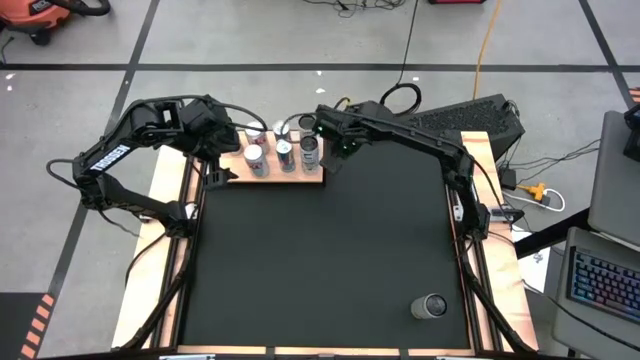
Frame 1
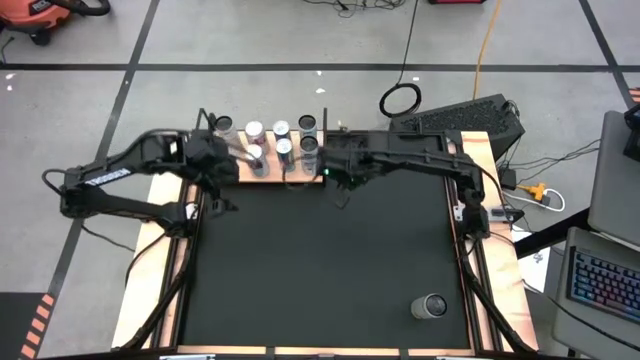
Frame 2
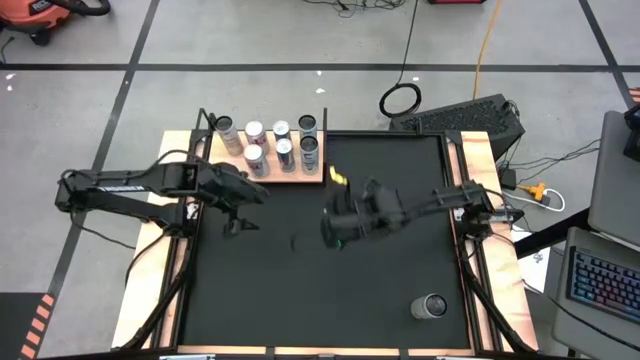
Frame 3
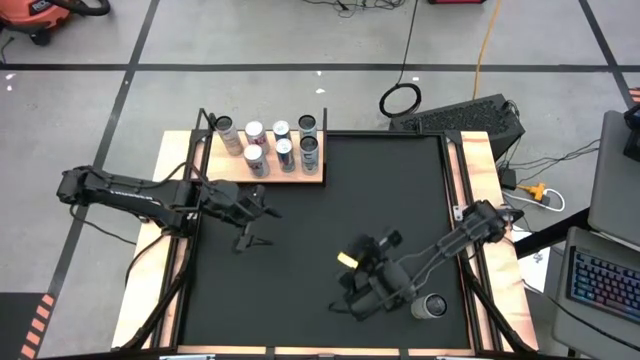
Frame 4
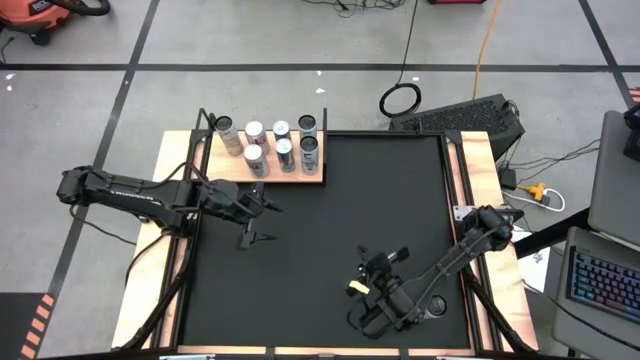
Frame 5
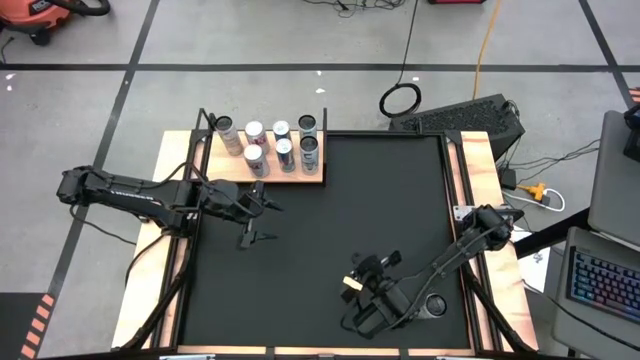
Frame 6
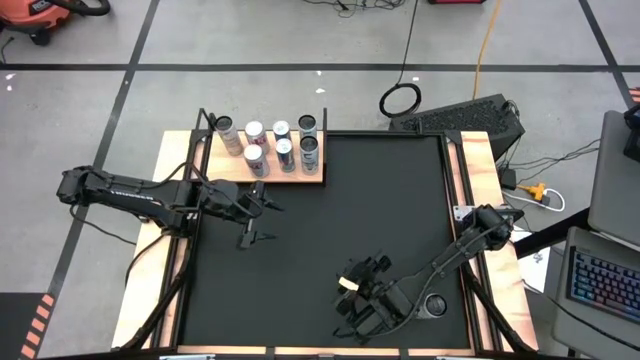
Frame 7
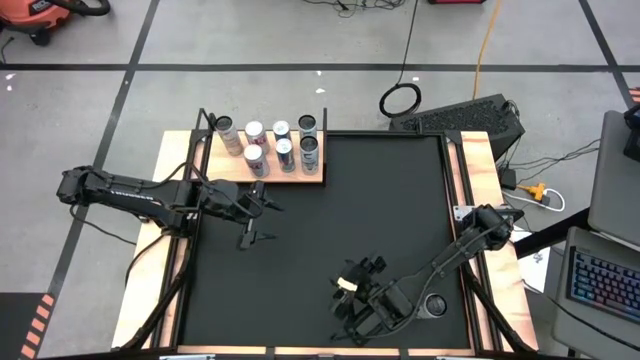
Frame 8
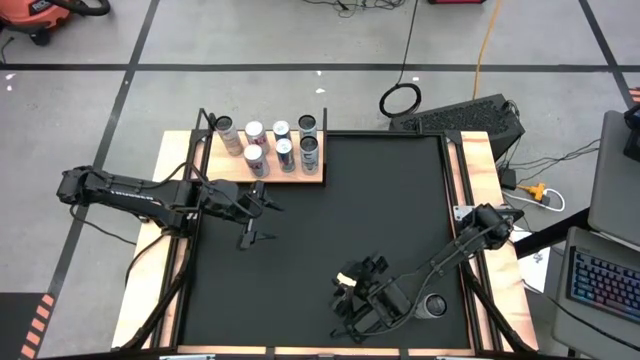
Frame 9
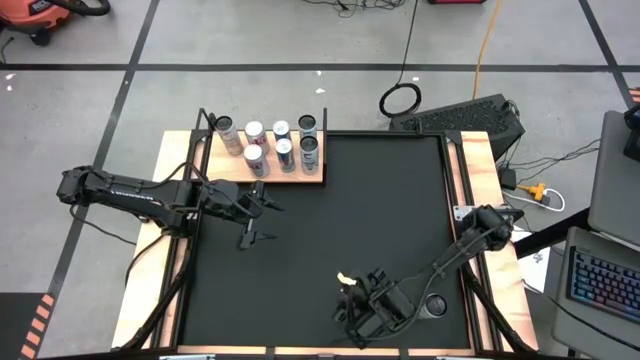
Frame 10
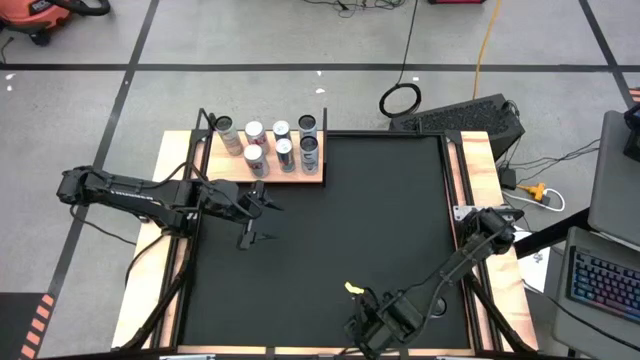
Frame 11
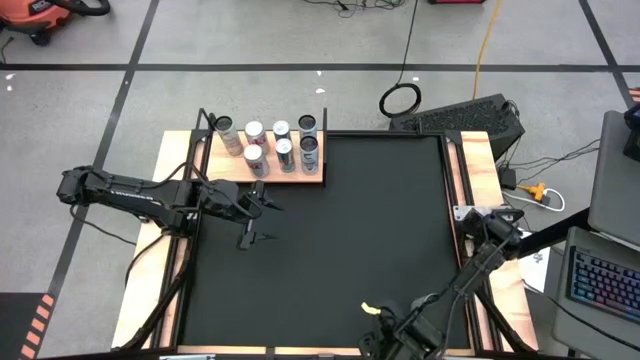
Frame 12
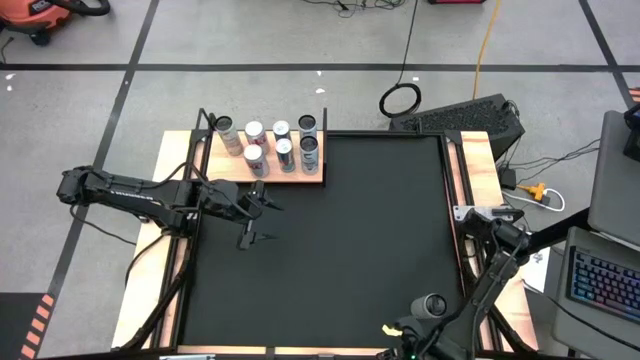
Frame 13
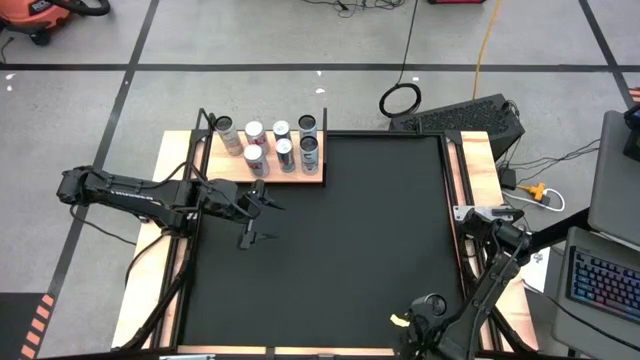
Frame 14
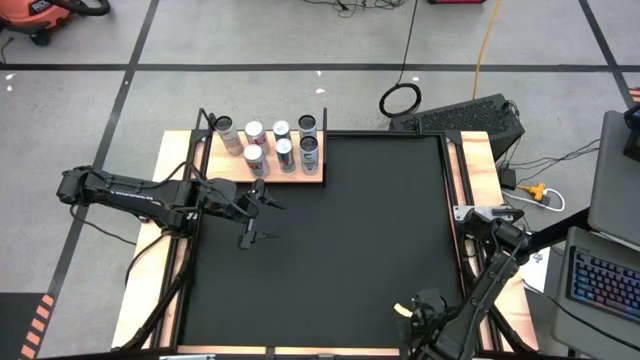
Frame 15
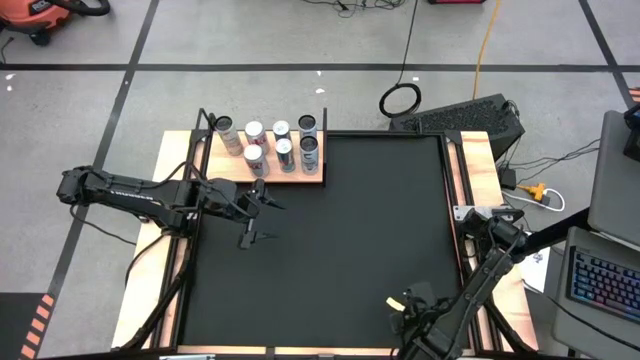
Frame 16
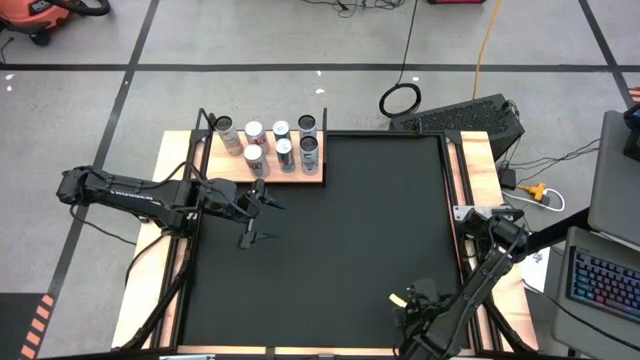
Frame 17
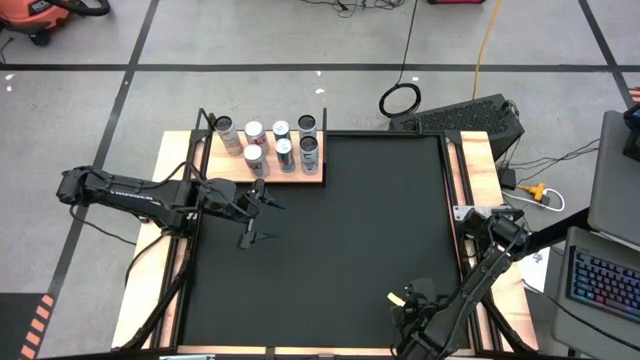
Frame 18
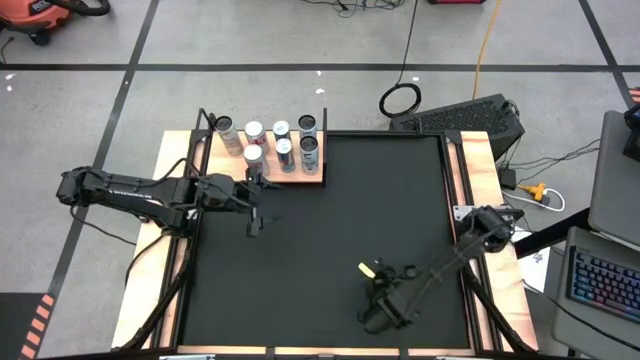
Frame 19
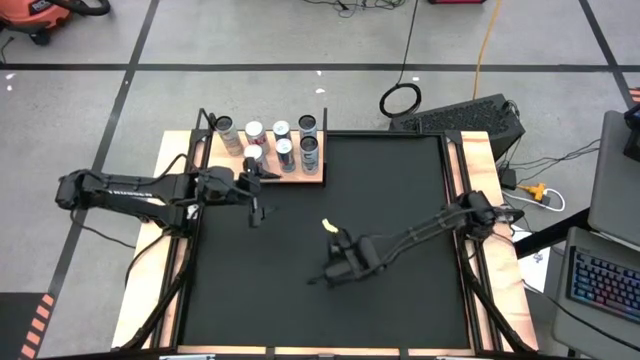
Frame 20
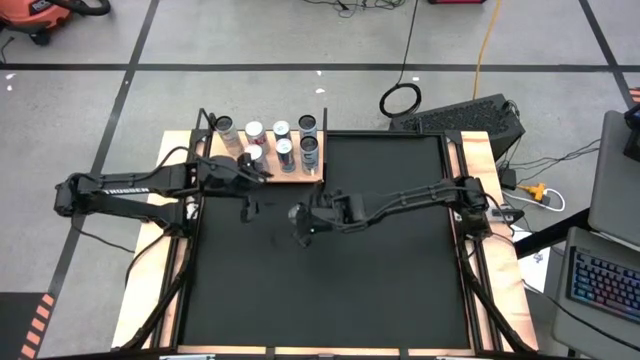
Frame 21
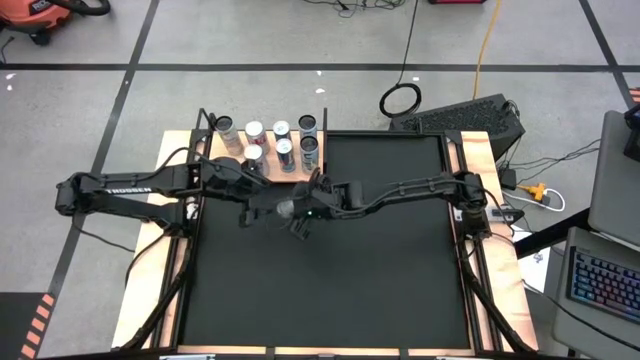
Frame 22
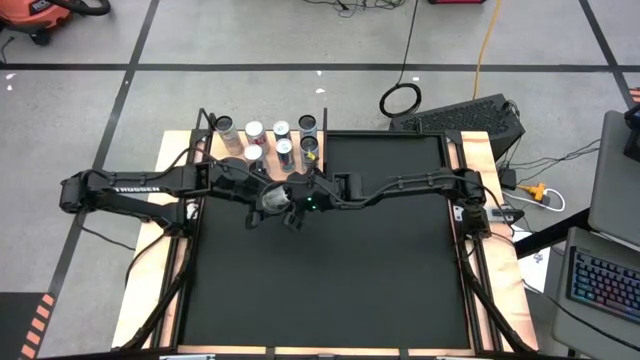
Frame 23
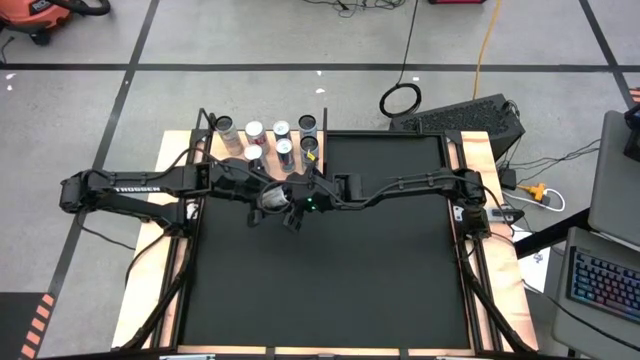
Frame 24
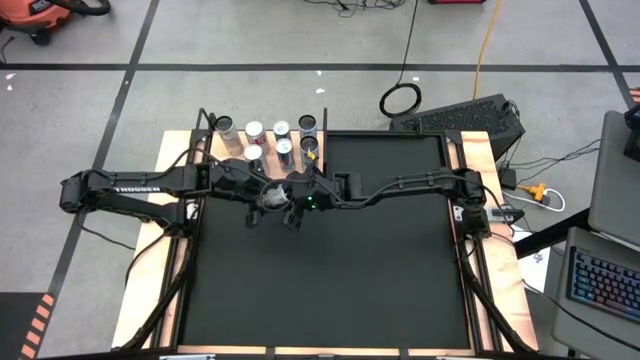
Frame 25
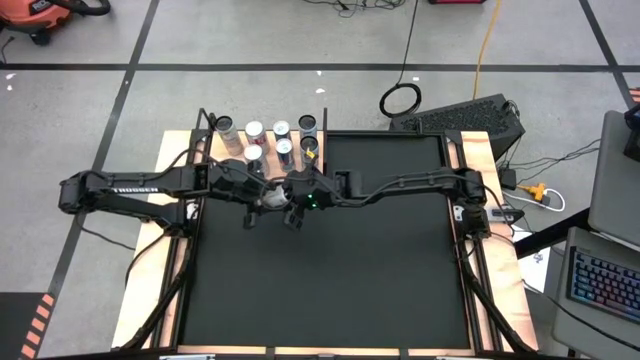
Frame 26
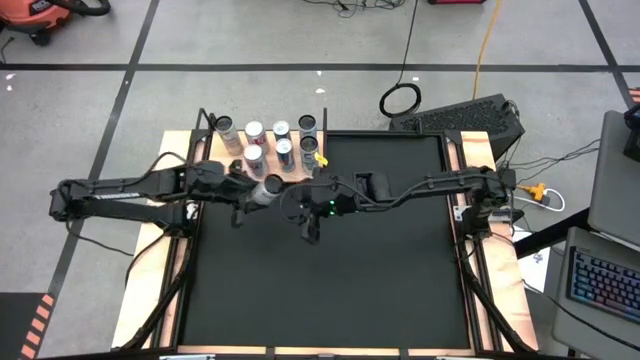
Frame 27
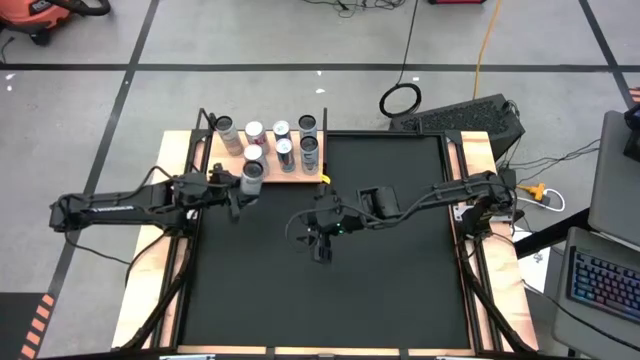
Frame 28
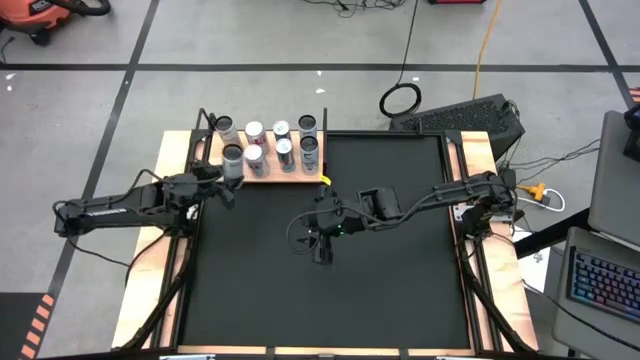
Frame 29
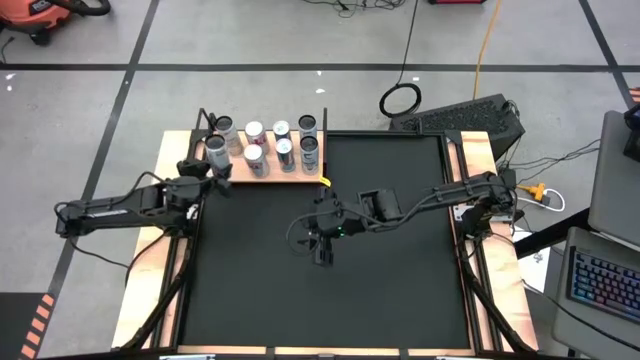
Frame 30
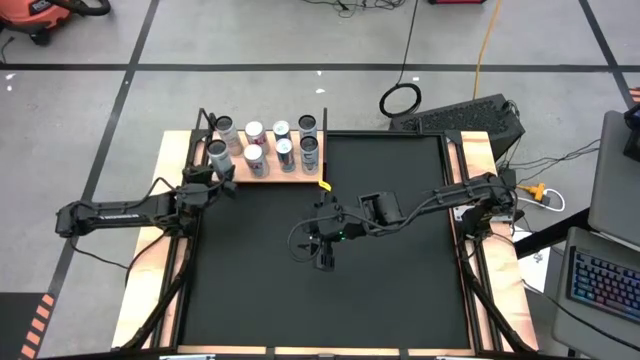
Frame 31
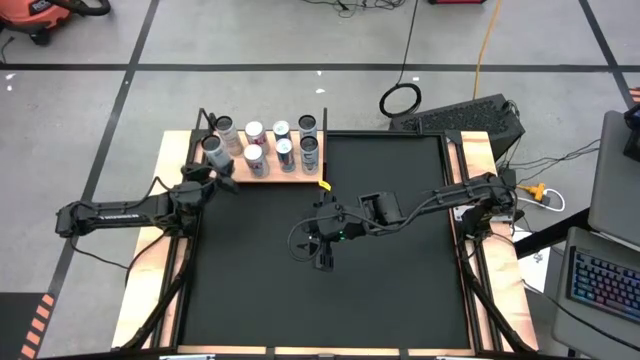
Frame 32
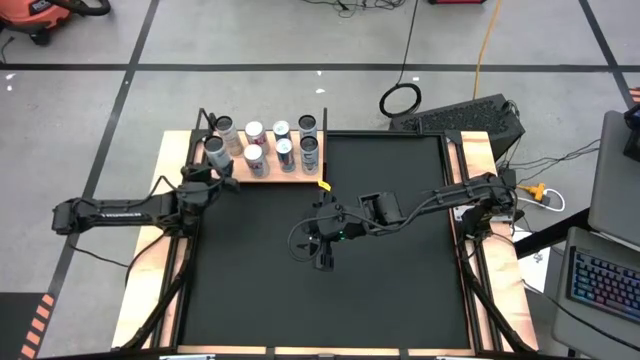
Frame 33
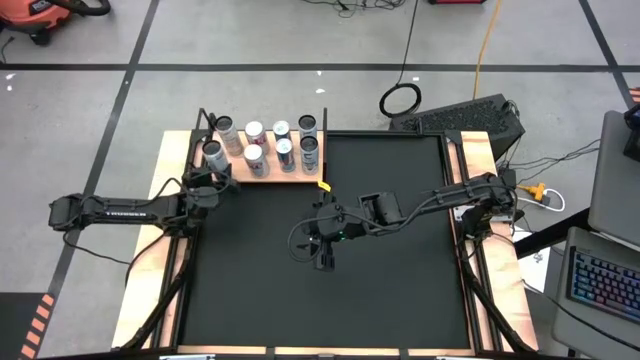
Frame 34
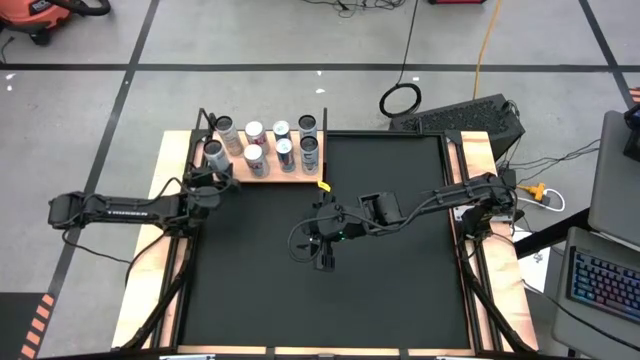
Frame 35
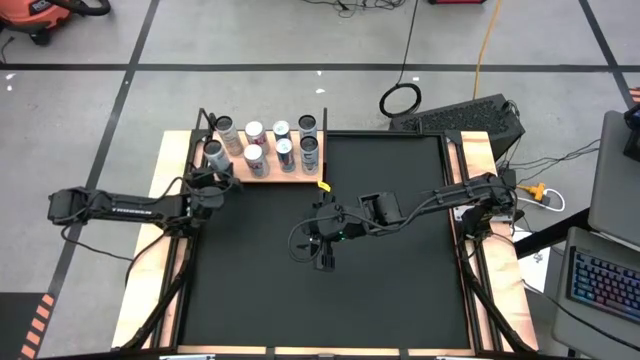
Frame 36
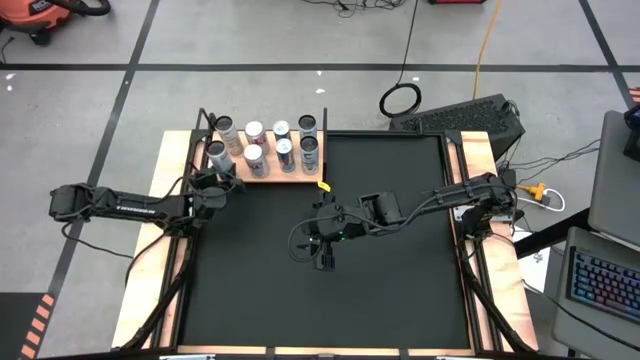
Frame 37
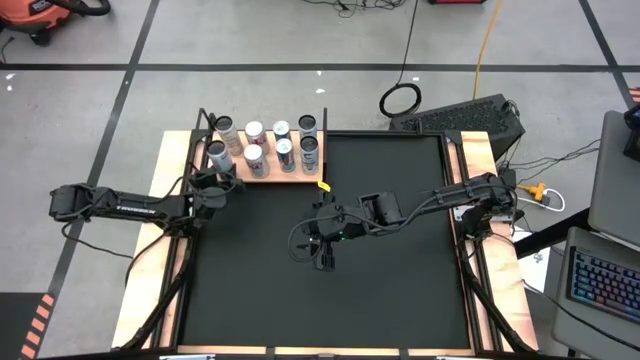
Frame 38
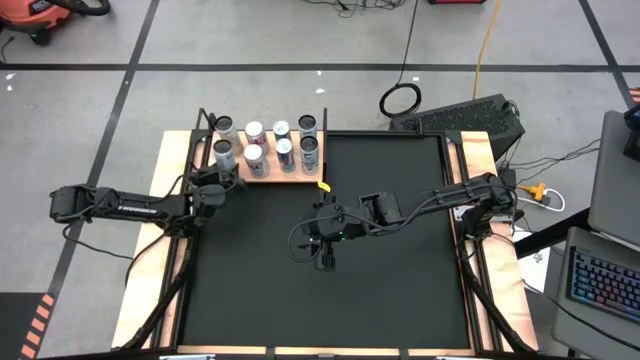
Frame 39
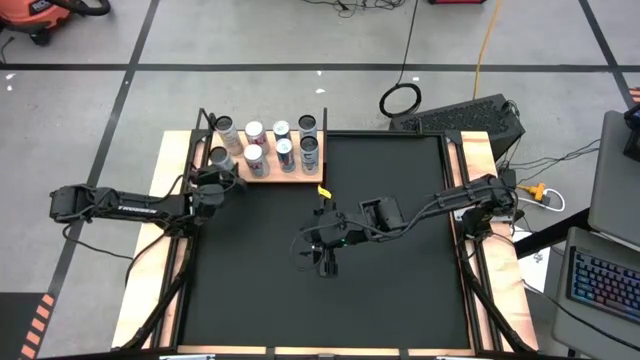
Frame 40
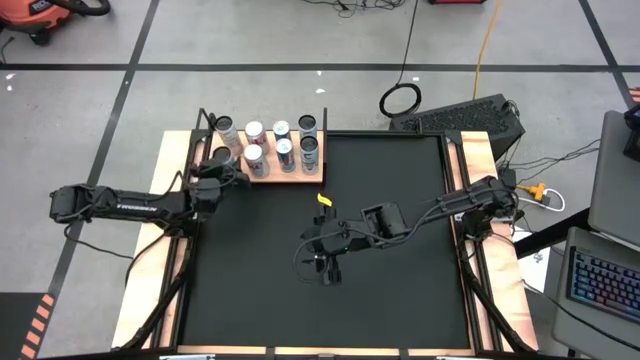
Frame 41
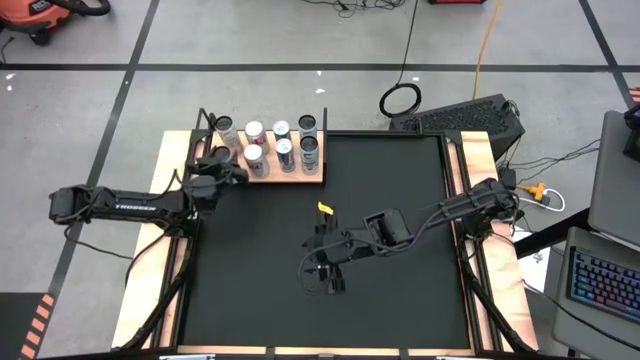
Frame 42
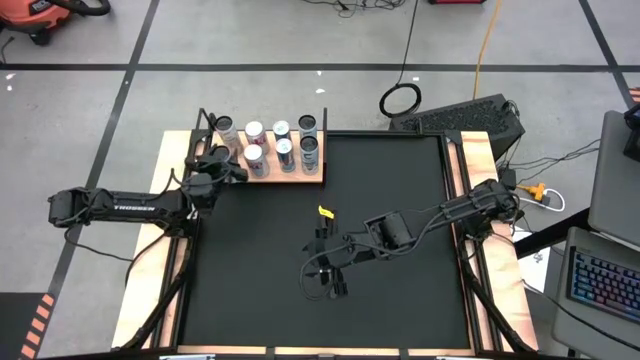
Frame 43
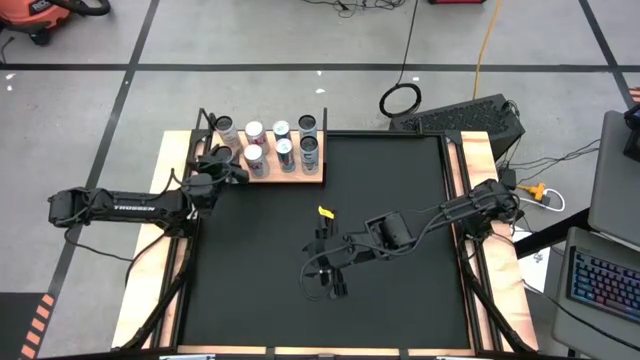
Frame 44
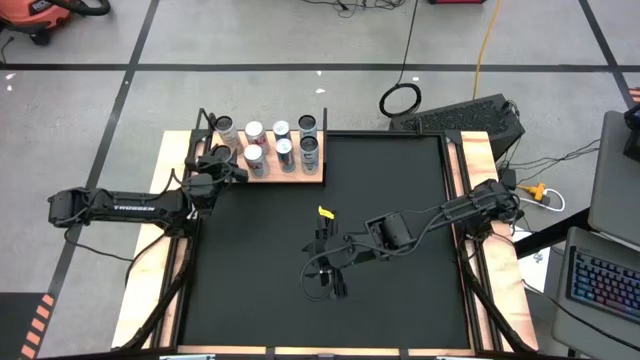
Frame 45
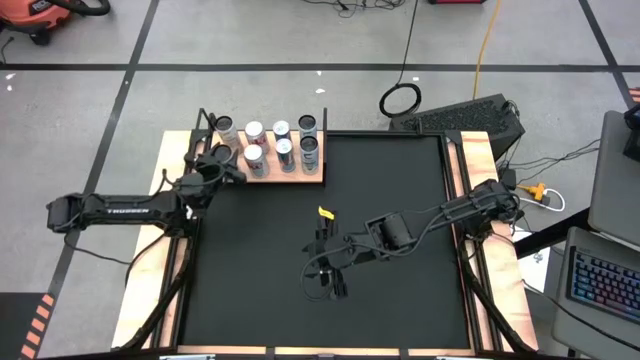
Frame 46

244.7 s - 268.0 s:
Task: Place canned beverage on shelf
Align the white and yellow soda can with the other white and yellow soda can on the shelf
